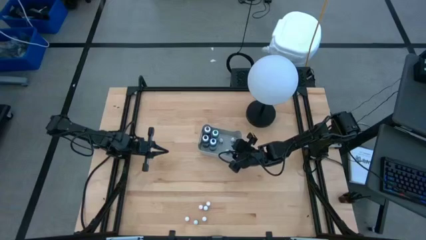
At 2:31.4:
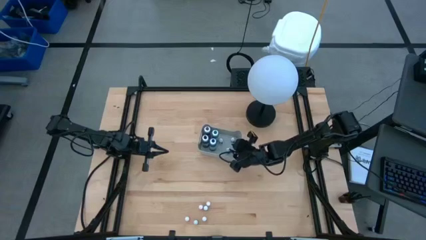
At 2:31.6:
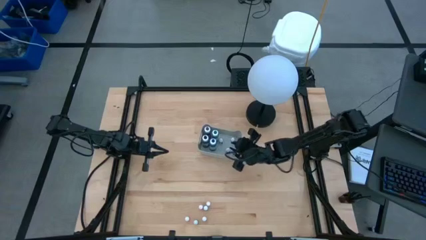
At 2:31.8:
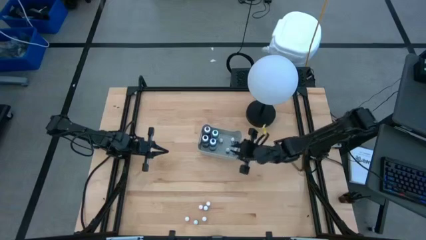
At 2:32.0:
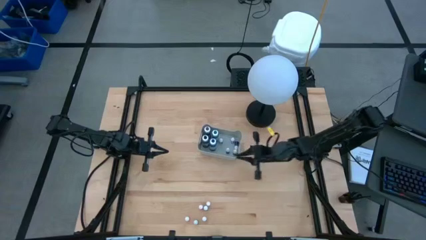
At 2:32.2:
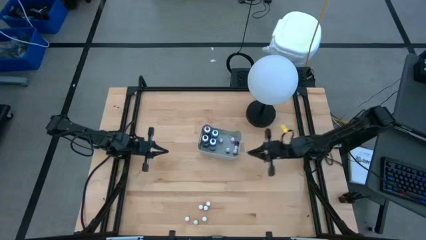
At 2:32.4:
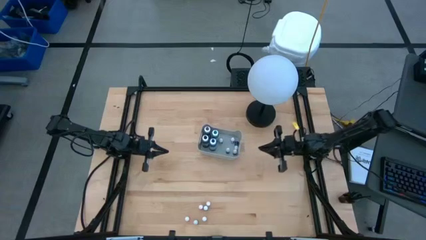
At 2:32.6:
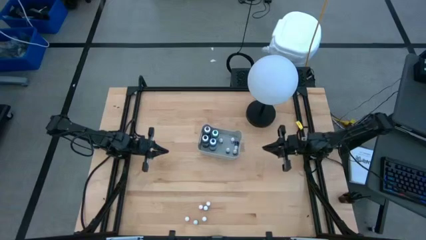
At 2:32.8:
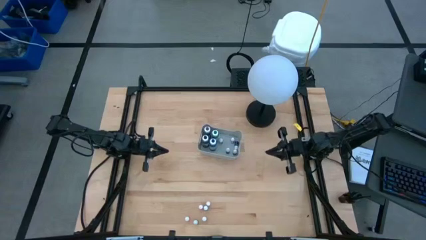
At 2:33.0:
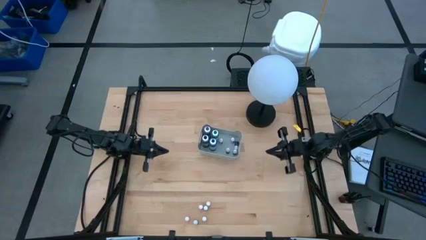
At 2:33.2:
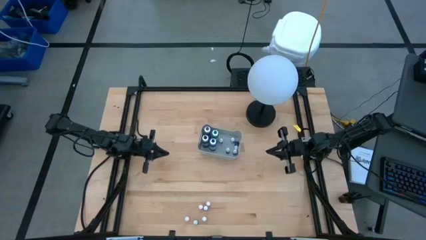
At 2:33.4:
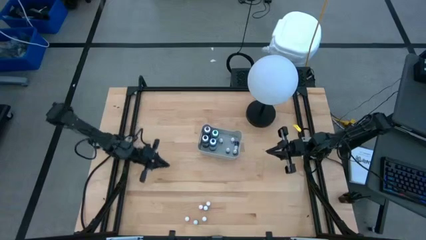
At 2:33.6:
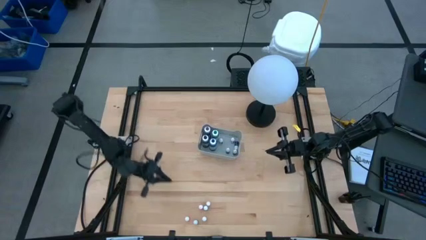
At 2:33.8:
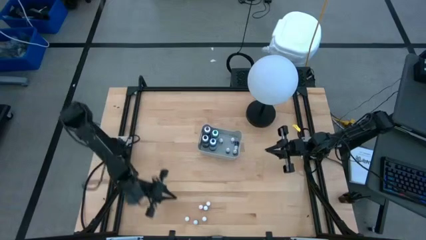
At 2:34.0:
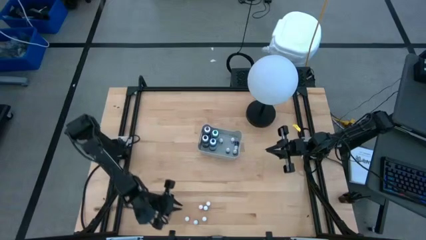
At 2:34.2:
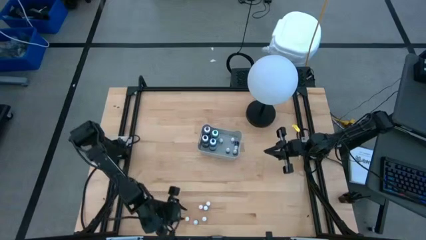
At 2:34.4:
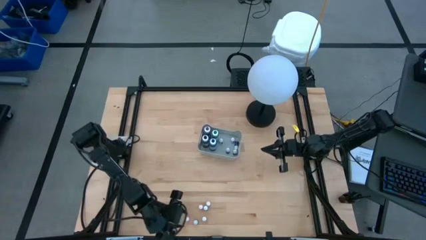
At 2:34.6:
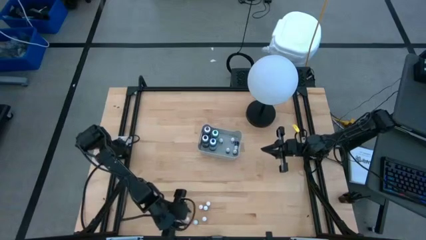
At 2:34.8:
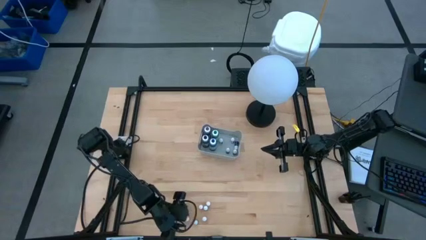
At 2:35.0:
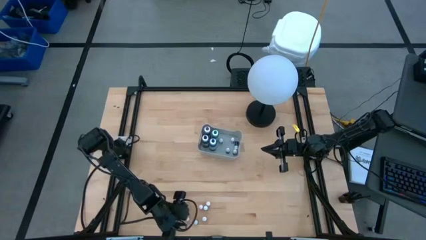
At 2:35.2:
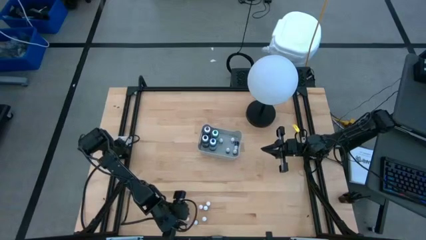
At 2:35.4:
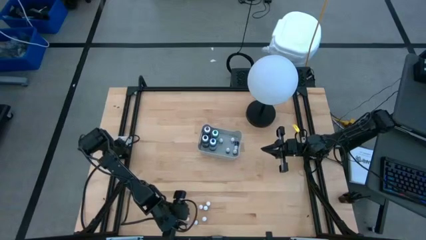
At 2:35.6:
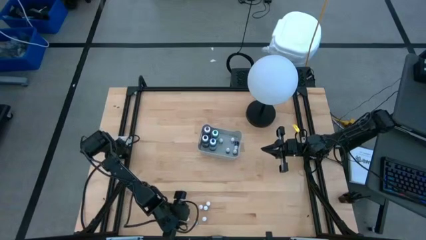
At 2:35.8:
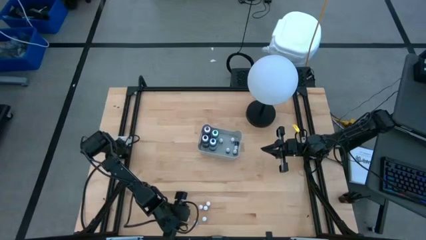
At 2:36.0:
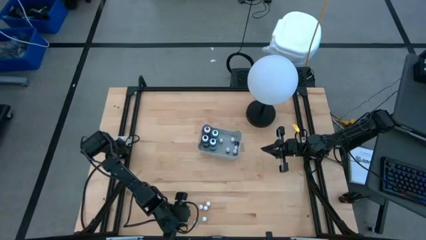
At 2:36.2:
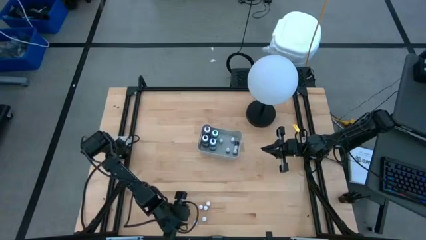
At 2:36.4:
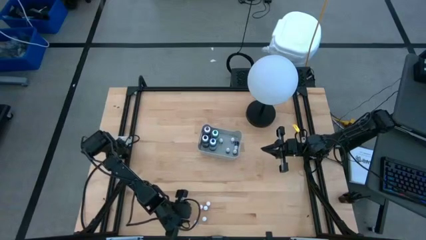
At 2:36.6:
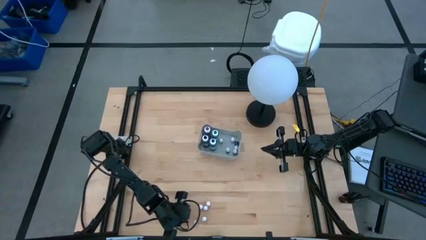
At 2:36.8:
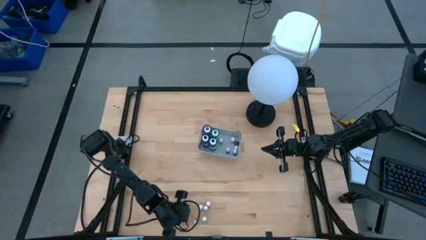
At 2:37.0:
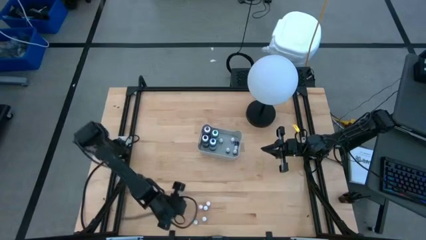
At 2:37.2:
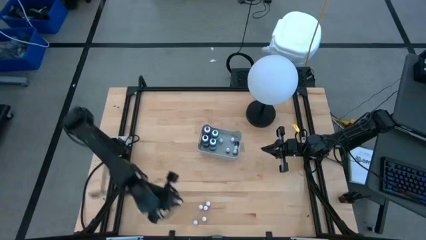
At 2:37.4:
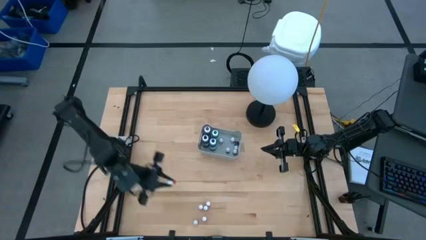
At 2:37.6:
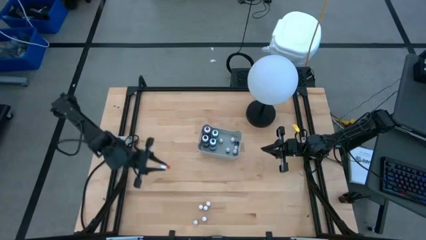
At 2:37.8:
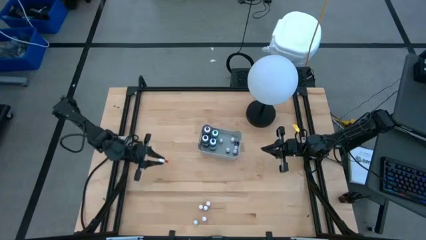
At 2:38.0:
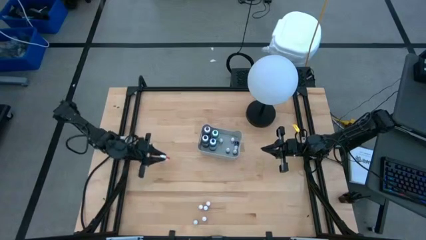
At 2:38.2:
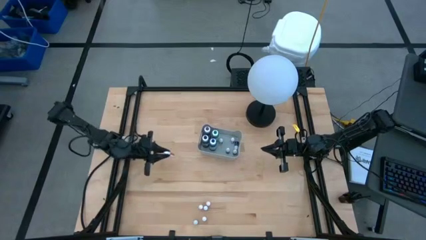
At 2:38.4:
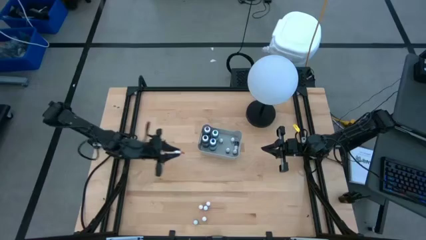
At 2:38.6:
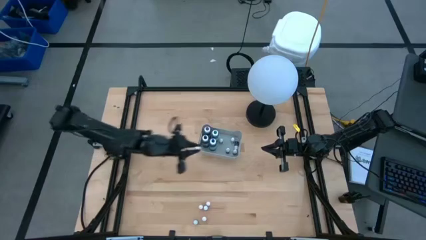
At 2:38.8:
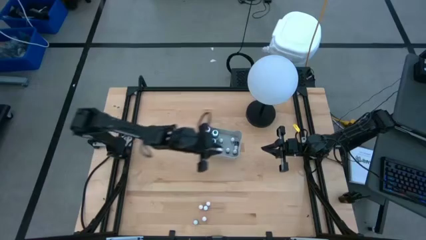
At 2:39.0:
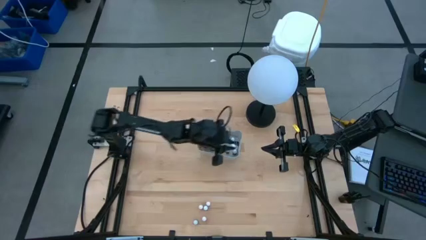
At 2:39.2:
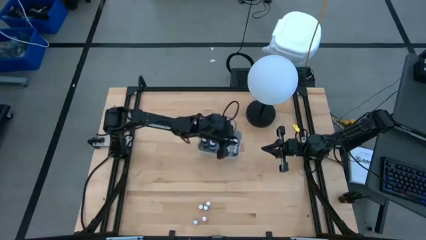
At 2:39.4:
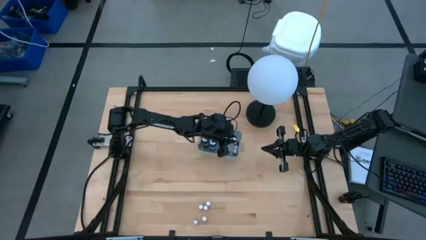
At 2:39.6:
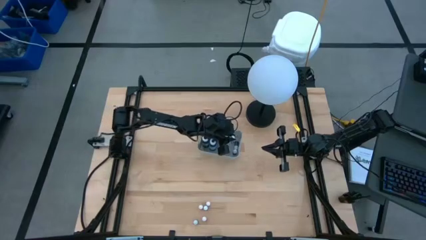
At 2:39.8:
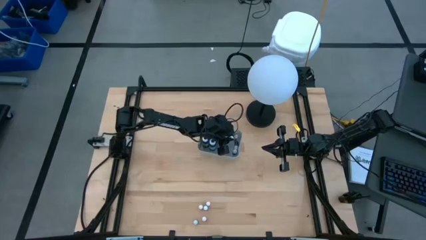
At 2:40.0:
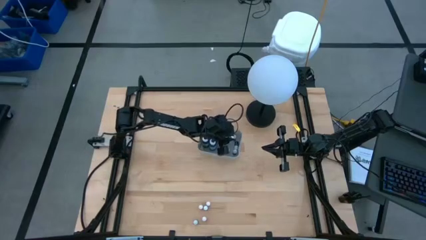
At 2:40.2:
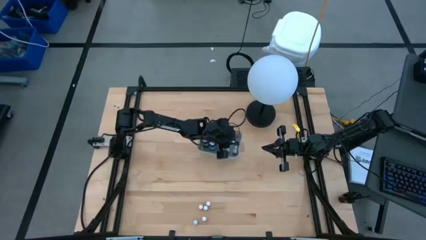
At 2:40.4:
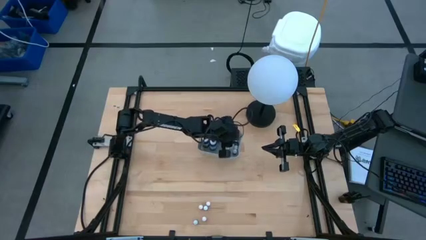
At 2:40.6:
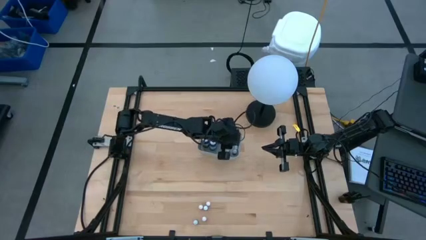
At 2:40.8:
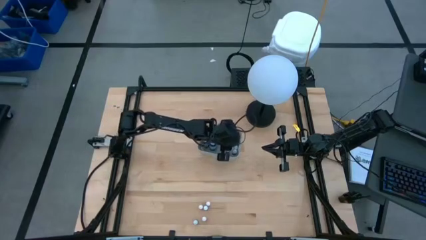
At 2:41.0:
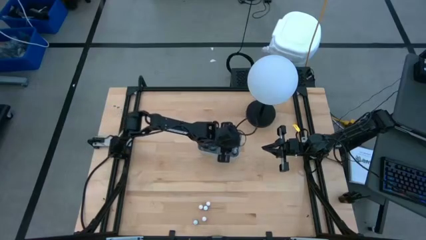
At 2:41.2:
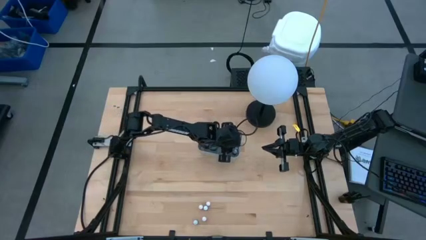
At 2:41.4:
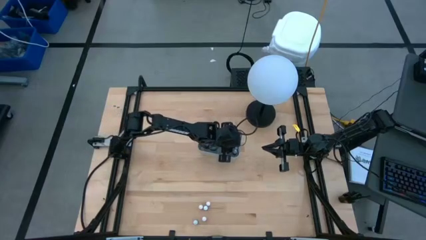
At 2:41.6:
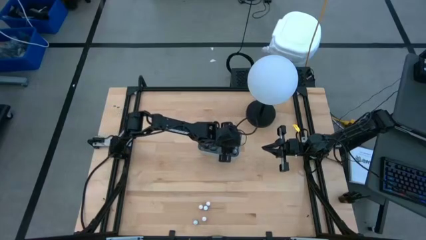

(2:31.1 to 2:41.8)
Task: Pick & Place food coloring
Put the small orange food coloring bottle into the gray bin

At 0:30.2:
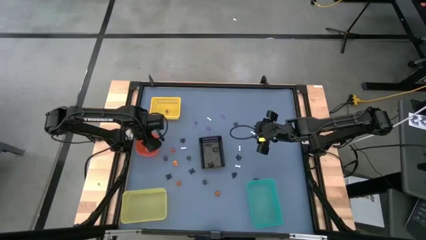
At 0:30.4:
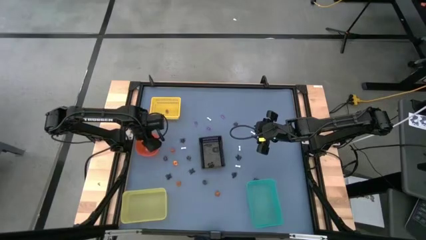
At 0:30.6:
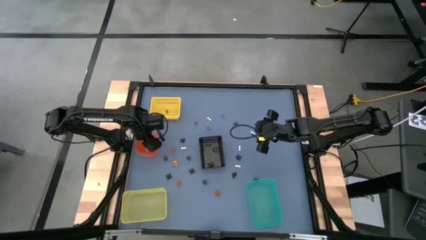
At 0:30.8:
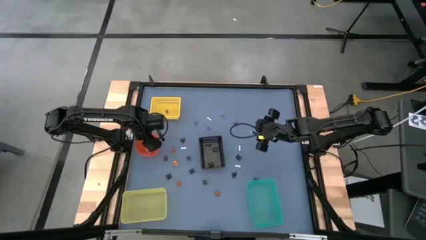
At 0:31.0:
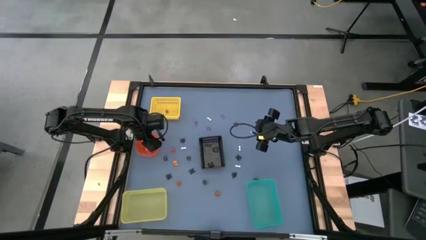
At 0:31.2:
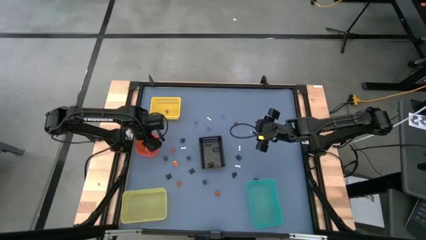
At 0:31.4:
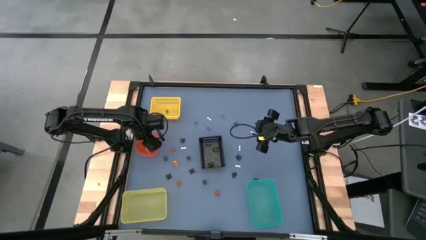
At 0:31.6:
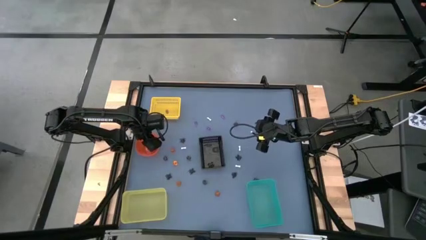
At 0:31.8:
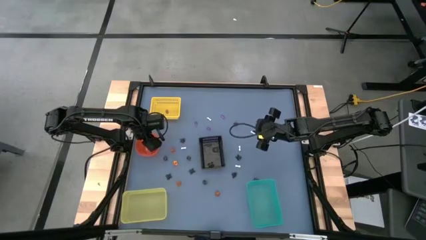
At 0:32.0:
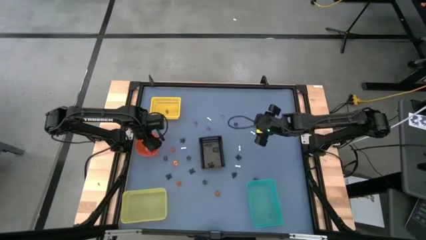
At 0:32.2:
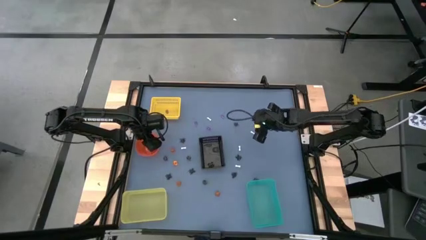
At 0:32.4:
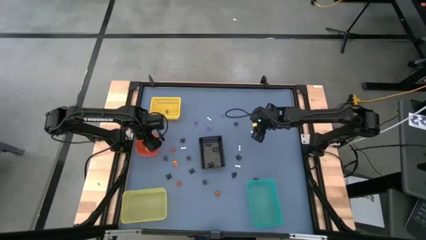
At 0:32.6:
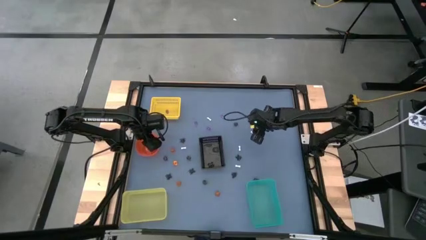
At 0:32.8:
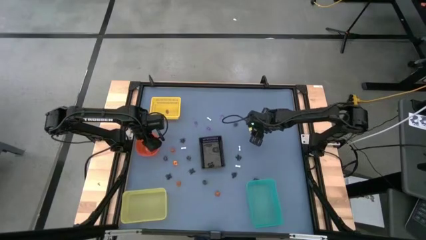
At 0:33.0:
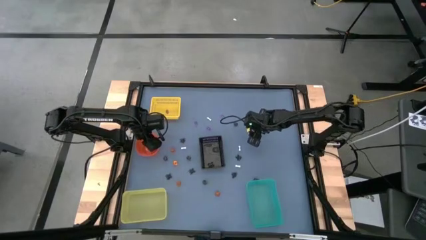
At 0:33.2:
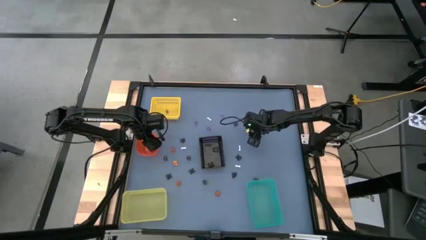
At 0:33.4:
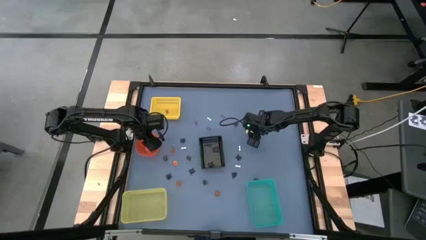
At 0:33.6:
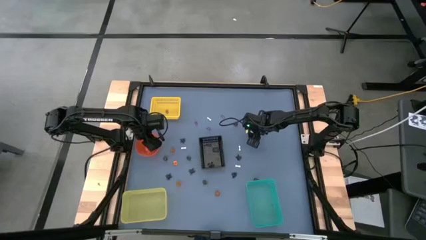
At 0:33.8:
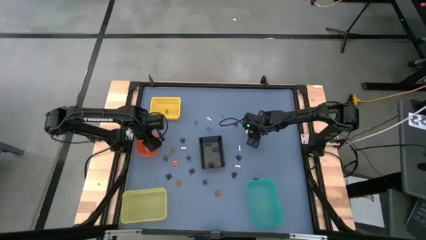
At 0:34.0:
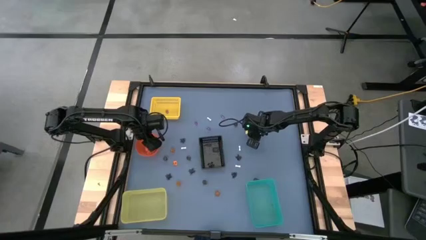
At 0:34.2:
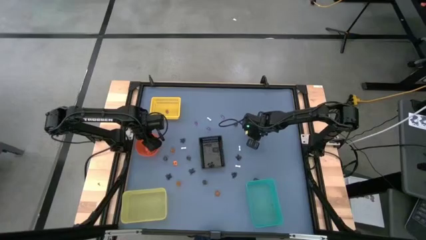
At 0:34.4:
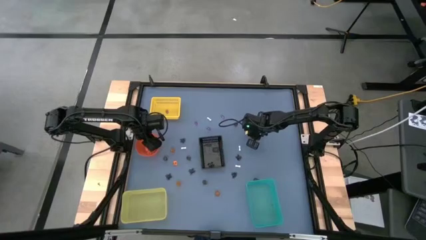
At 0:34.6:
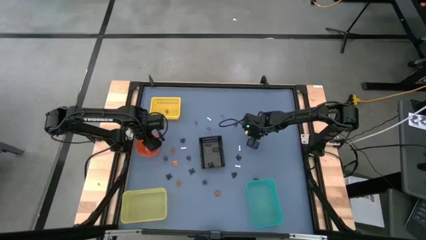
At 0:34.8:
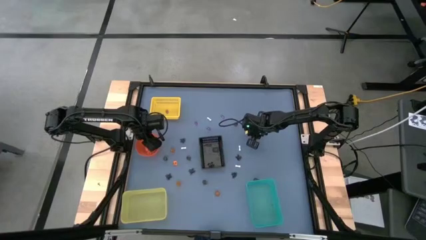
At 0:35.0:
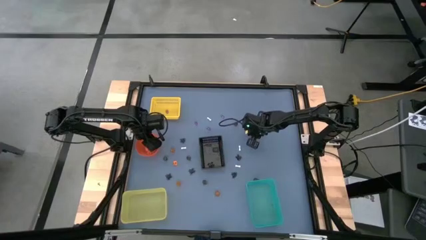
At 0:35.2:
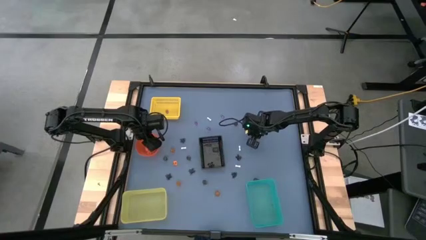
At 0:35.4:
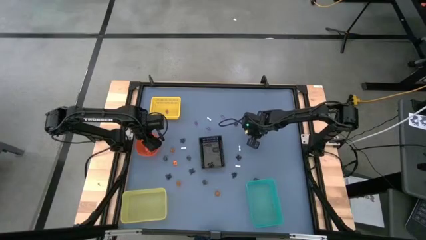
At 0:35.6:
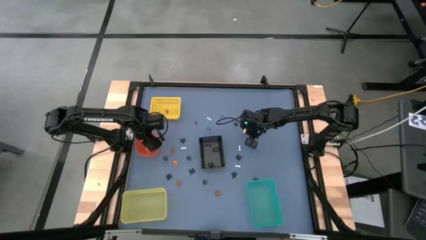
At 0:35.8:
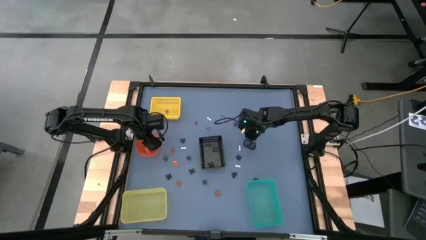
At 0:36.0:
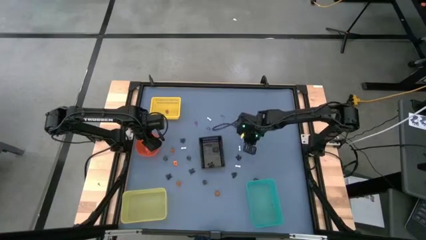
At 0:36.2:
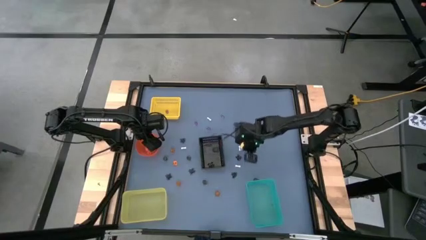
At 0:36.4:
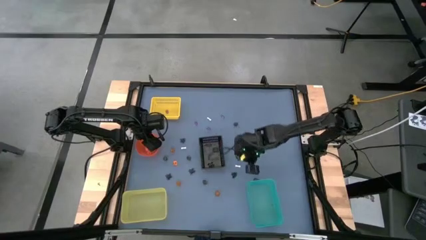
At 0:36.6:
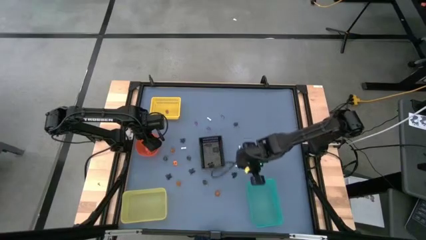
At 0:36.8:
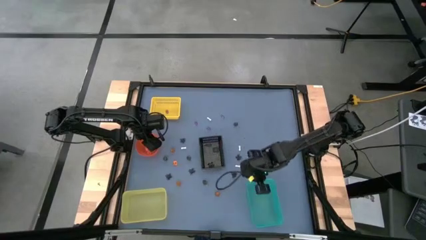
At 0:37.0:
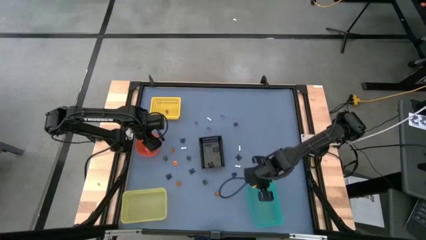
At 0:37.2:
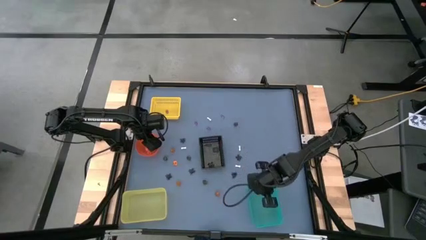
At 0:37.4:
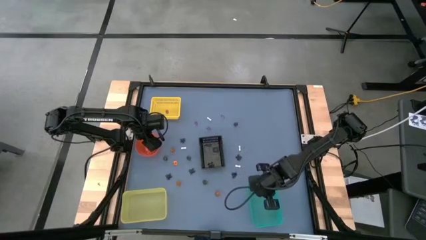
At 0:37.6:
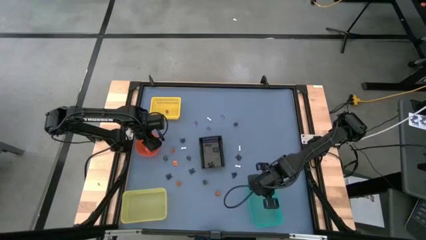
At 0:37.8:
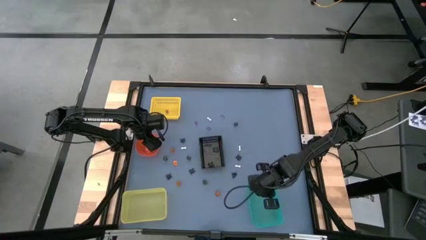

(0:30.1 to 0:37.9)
Task: Sort Halloween decoration
Put the white bone toy into the green bin
